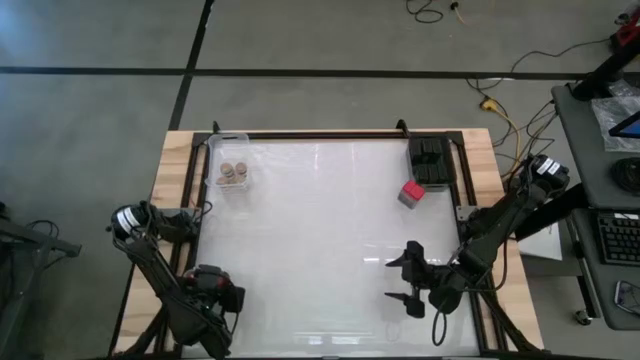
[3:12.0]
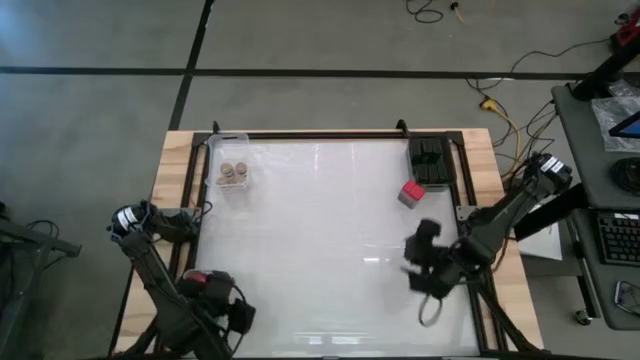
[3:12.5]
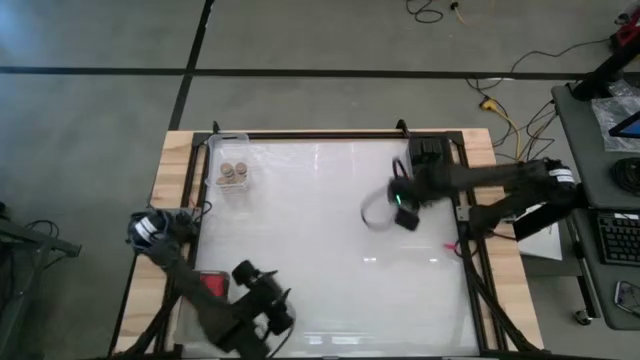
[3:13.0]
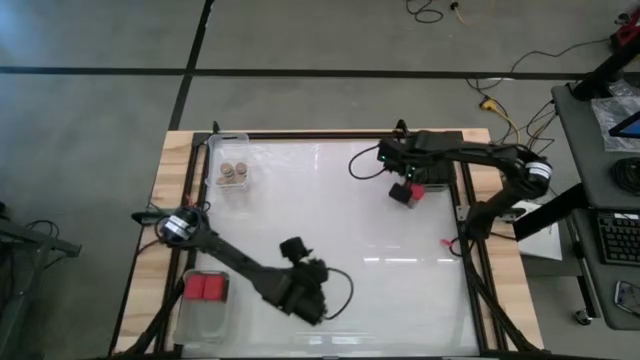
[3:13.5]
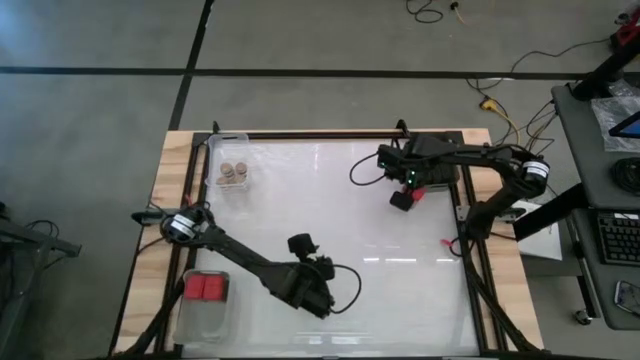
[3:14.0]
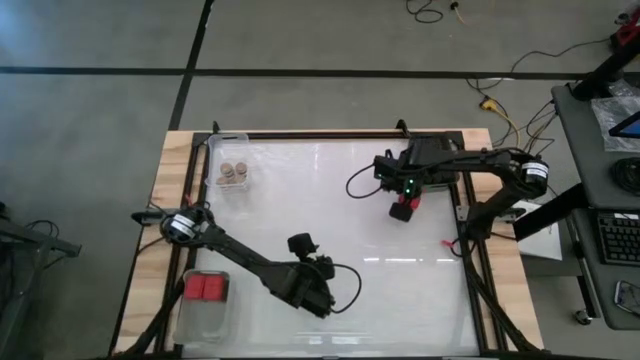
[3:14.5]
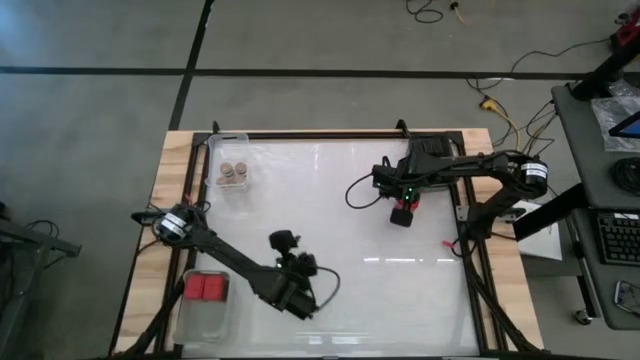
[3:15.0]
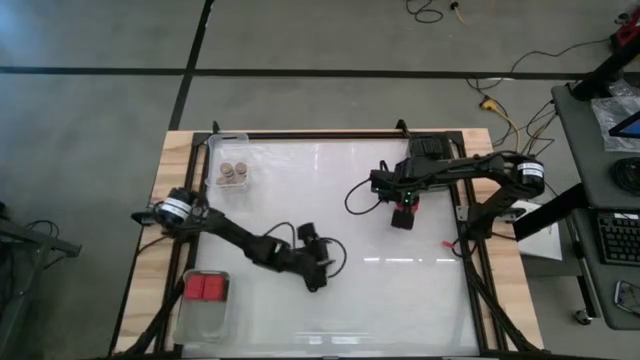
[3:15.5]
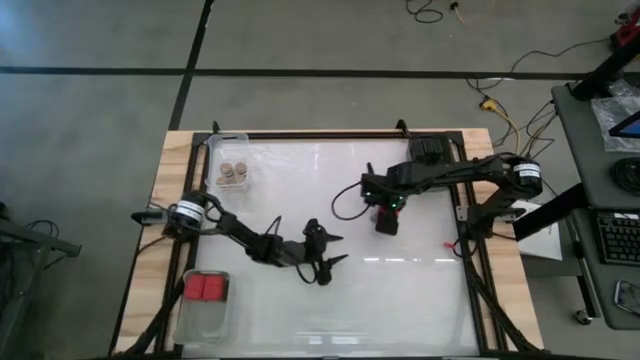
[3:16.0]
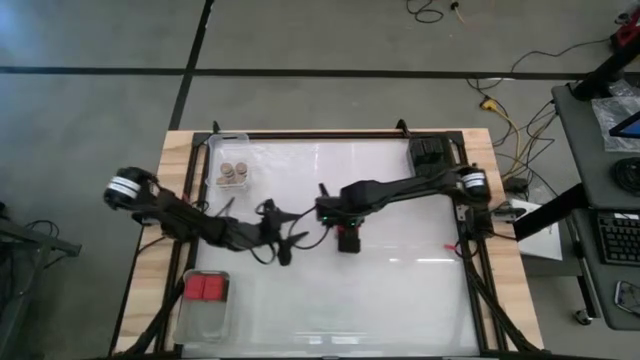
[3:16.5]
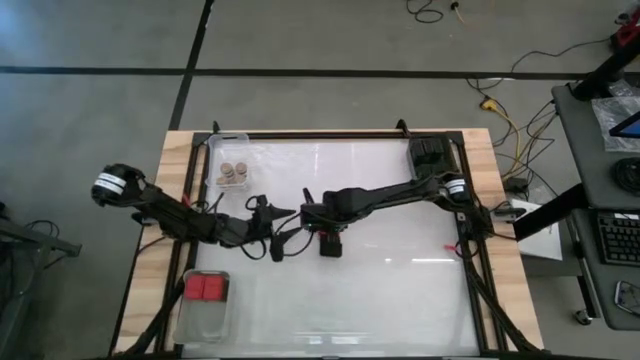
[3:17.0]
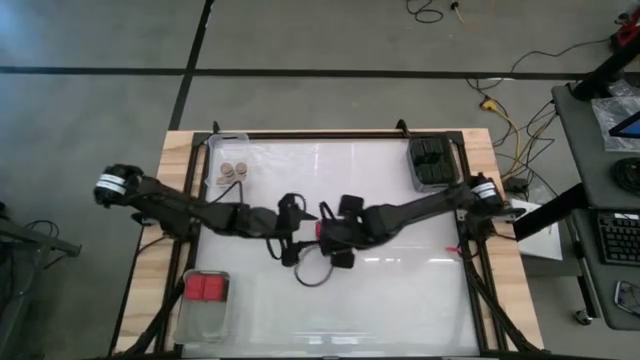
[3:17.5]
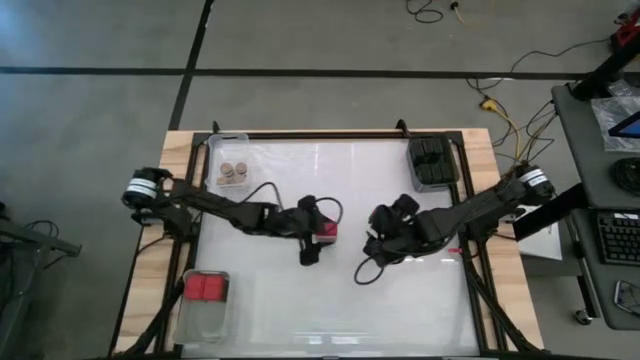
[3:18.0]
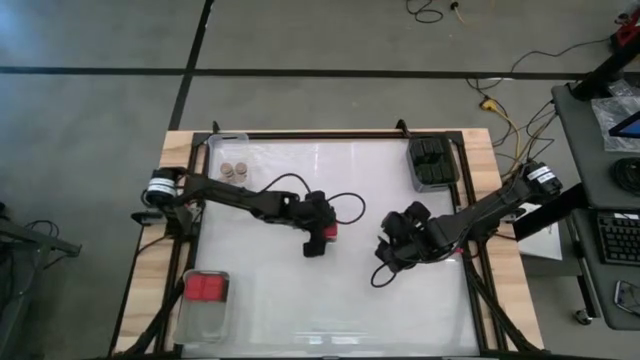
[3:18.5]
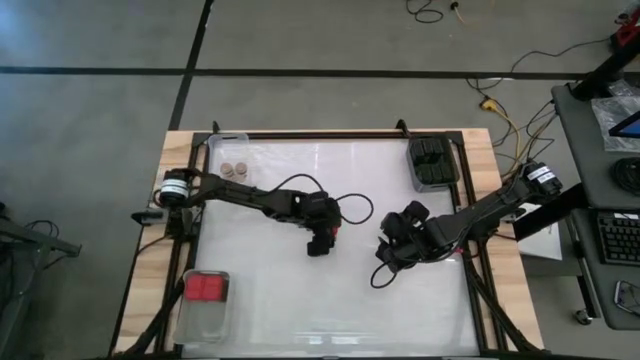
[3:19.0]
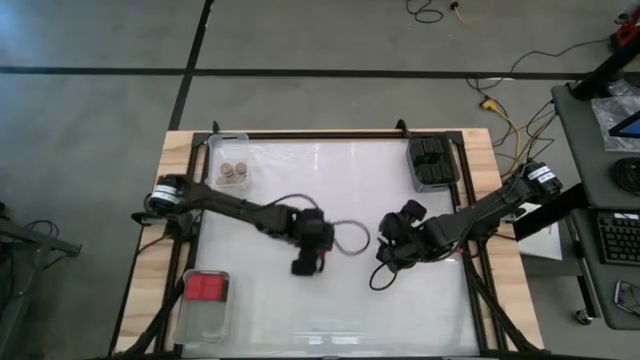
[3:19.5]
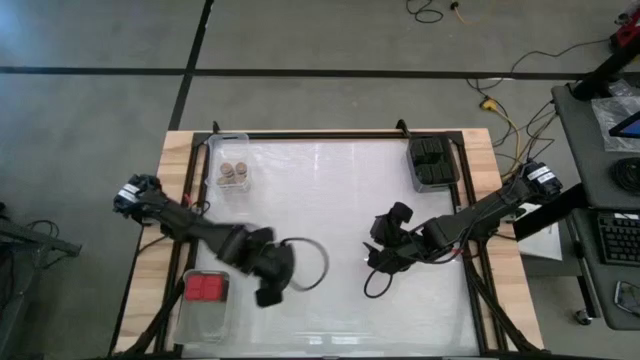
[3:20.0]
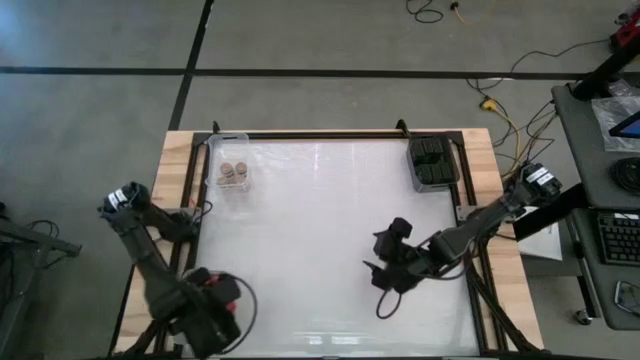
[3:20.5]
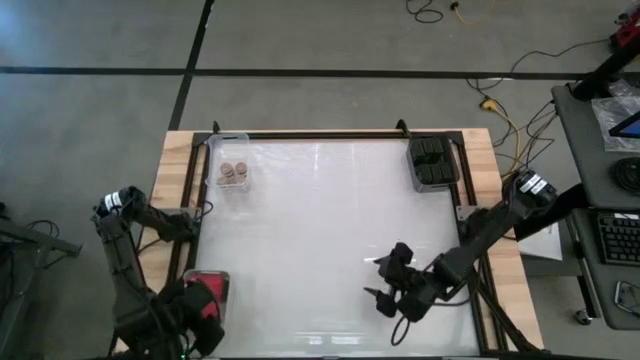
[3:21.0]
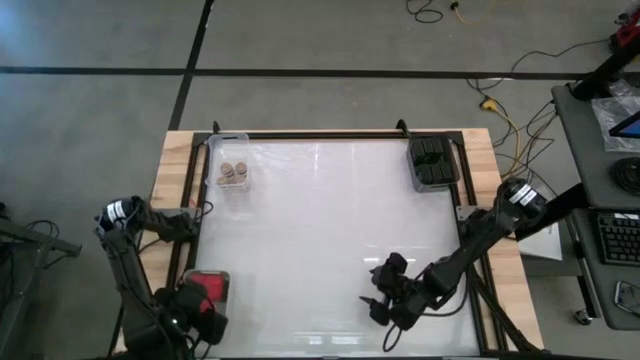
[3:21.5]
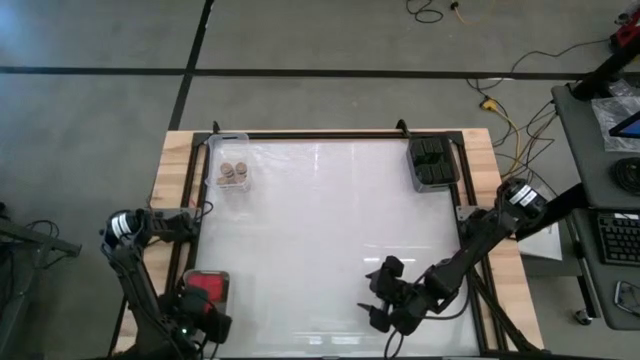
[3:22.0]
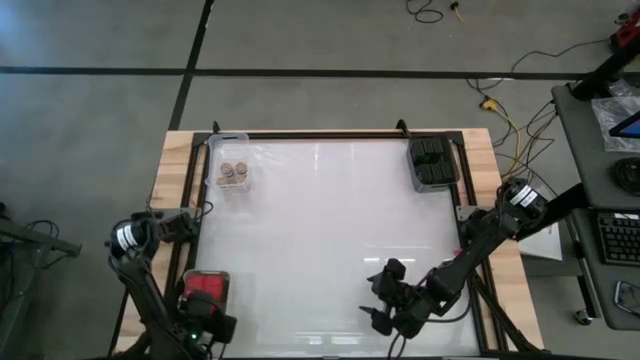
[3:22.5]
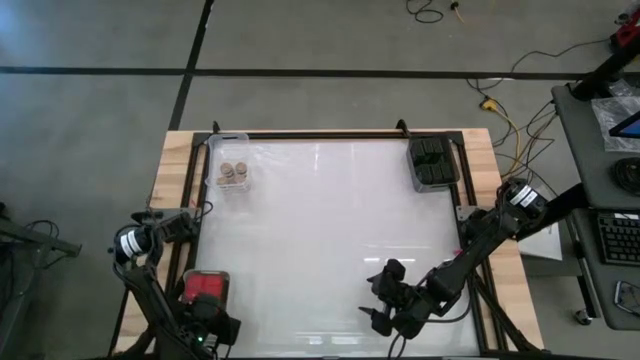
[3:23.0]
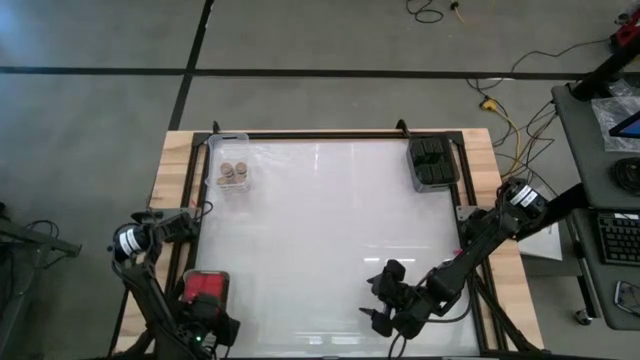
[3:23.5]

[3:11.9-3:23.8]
Task: Sort spices by type
Put the red seasoning can into the white bin

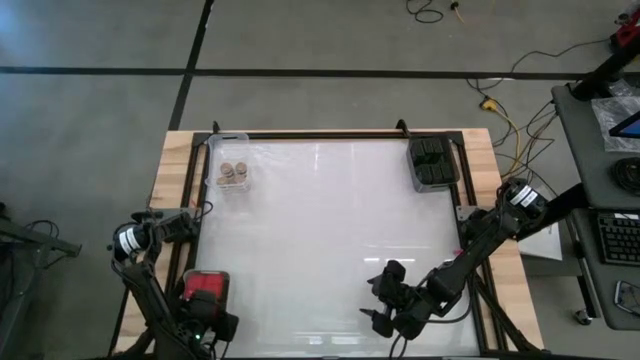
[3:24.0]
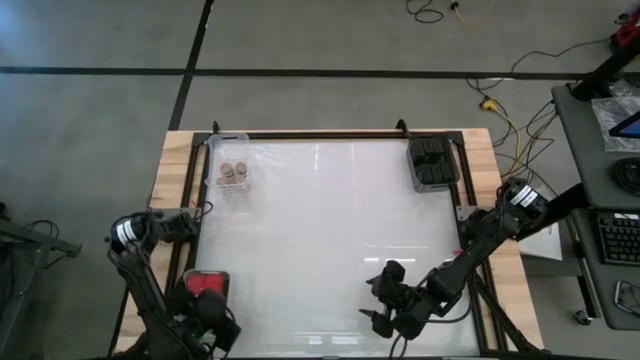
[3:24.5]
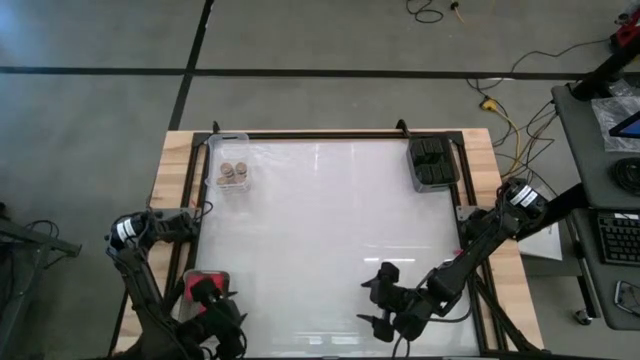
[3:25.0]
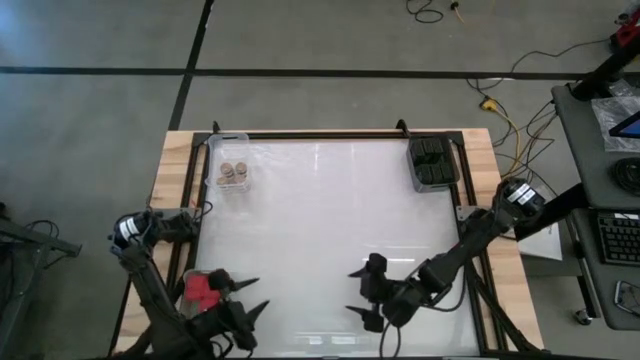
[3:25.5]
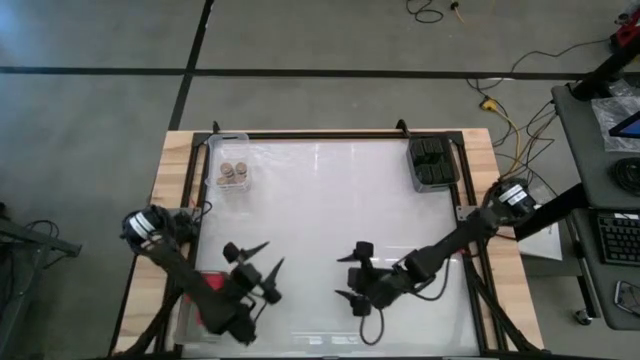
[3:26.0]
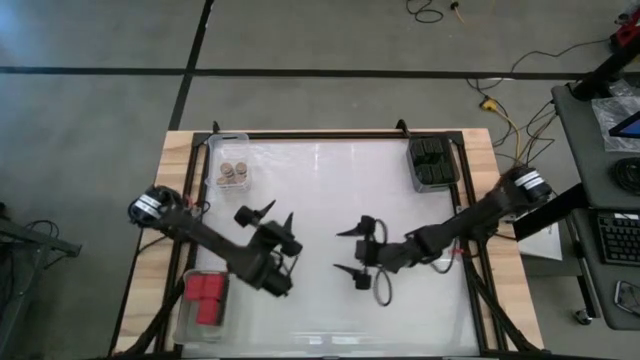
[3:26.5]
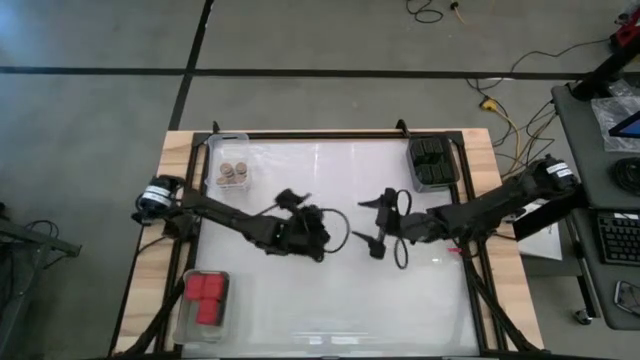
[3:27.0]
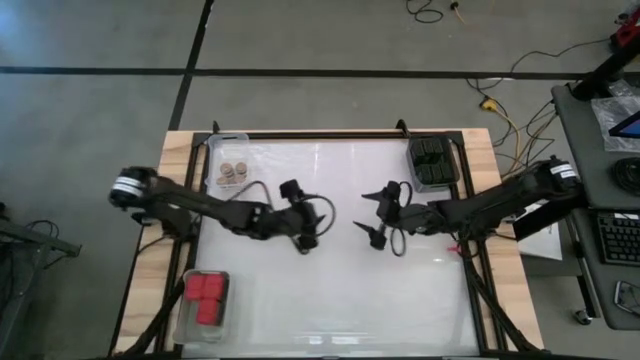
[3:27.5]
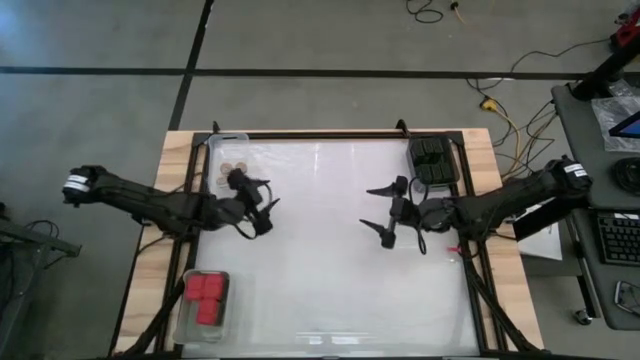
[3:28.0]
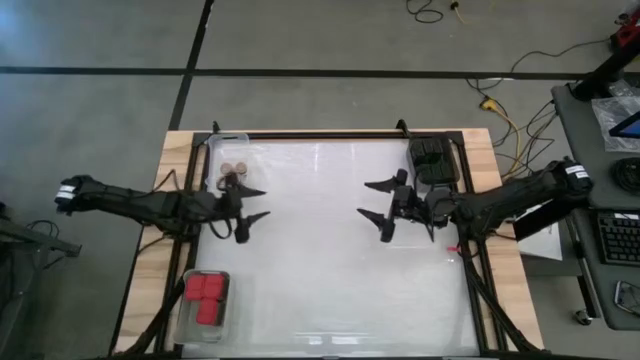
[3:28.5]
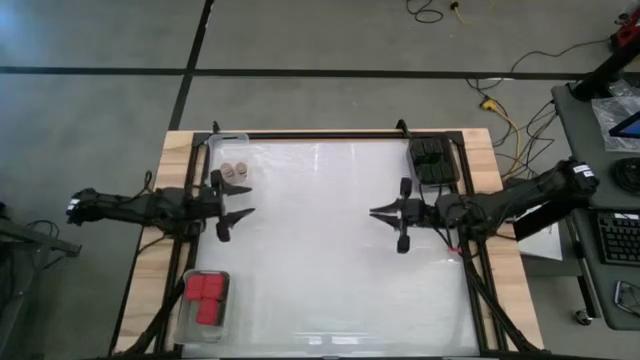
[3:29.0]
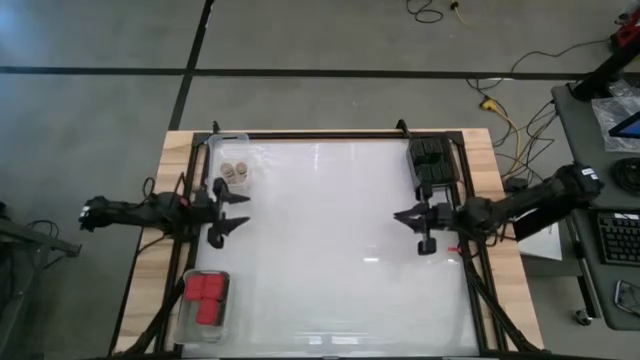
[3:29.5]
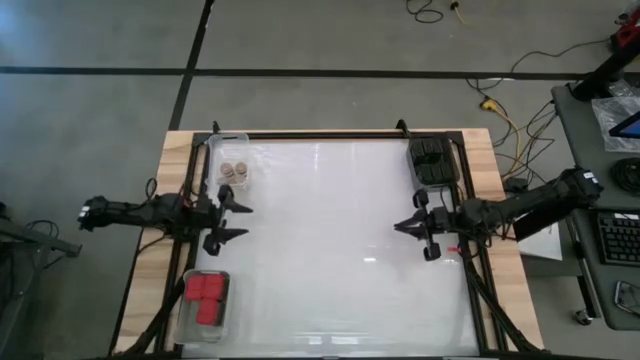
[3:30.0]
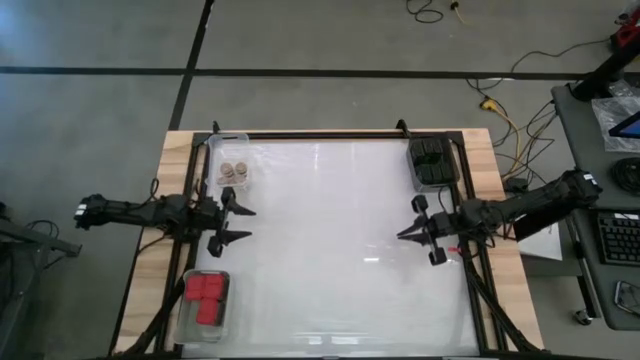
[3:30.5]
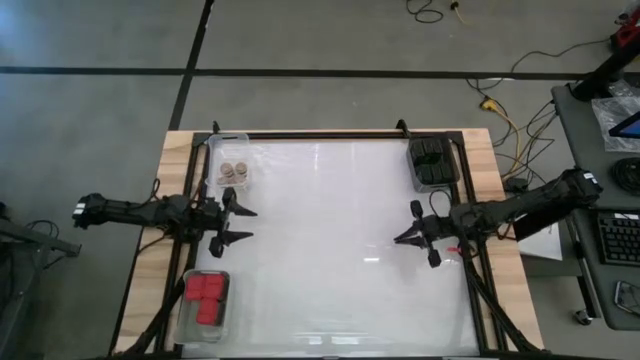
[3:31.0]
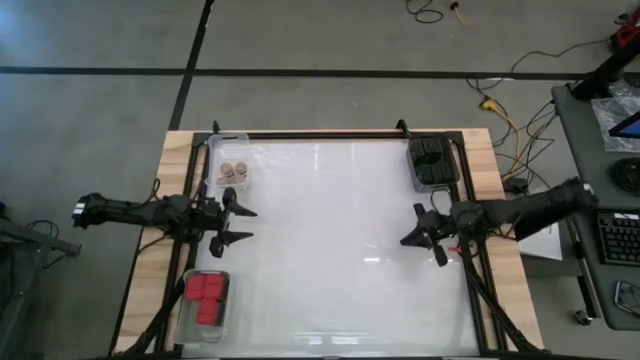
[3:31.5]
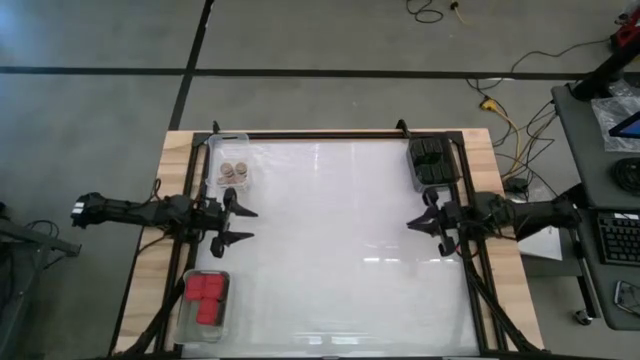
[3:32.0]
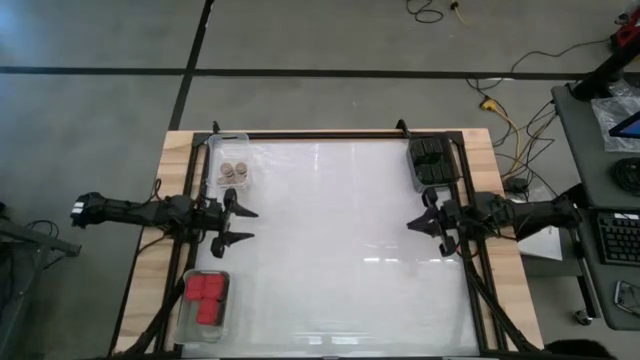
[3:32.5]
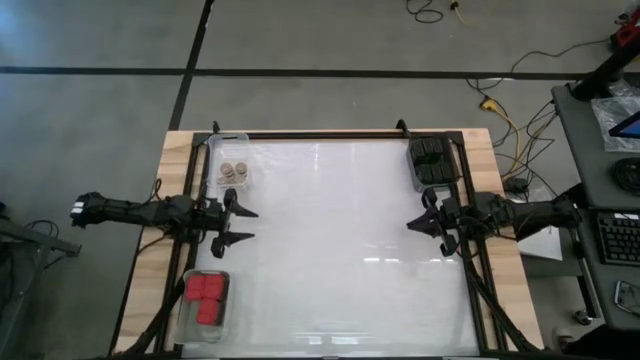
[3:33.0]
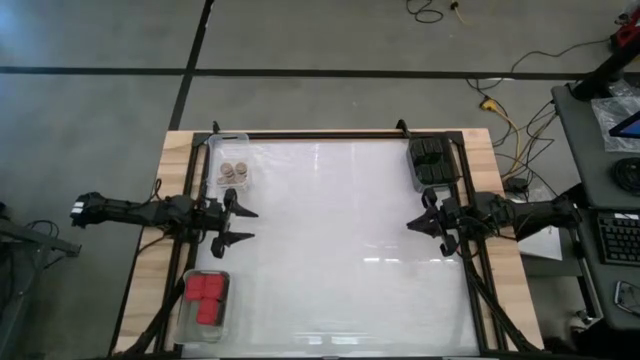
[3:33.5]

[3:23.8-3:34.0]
Return to Home Position
